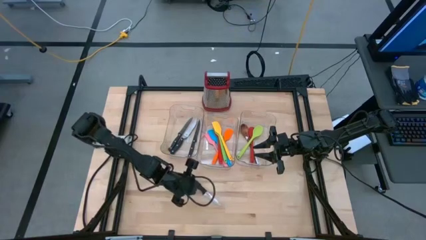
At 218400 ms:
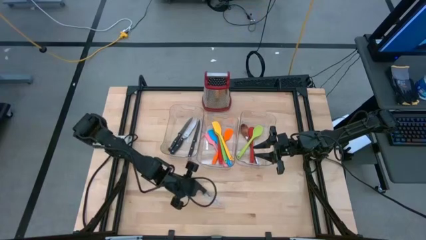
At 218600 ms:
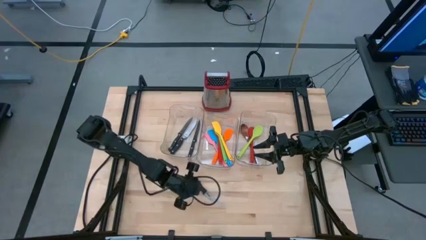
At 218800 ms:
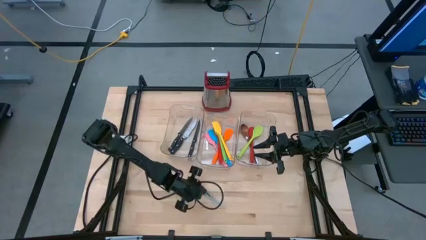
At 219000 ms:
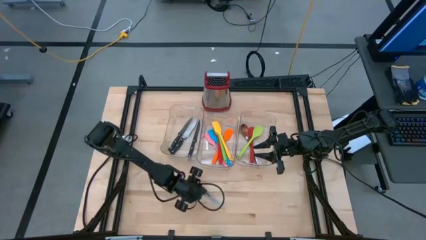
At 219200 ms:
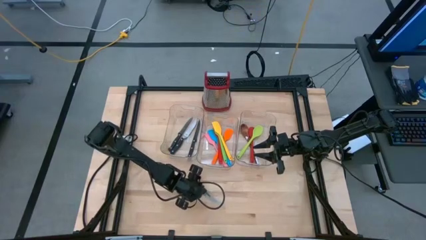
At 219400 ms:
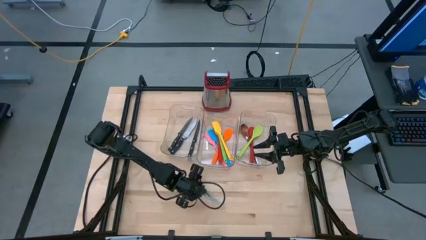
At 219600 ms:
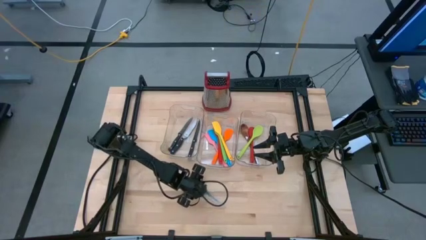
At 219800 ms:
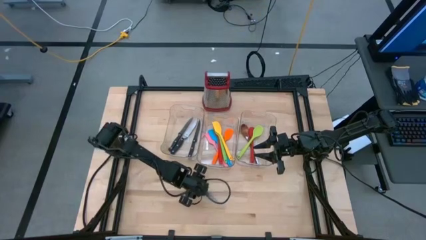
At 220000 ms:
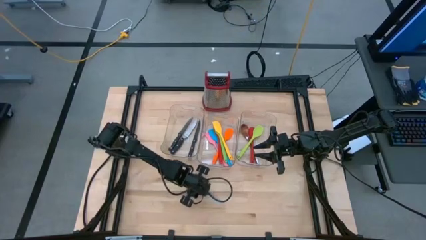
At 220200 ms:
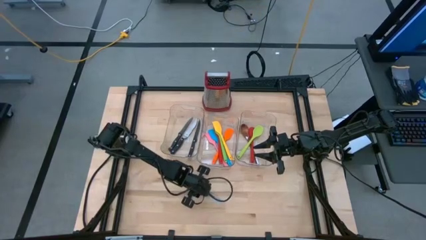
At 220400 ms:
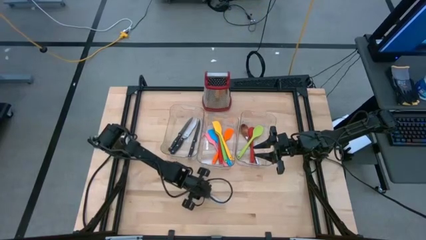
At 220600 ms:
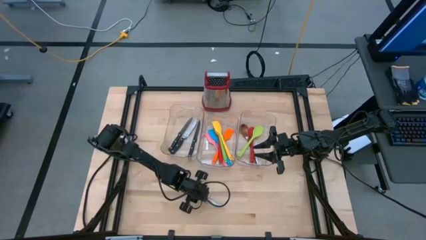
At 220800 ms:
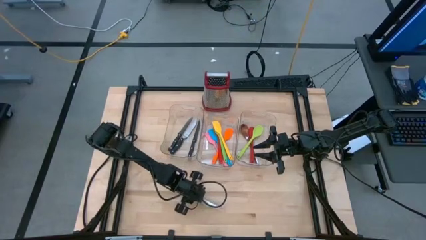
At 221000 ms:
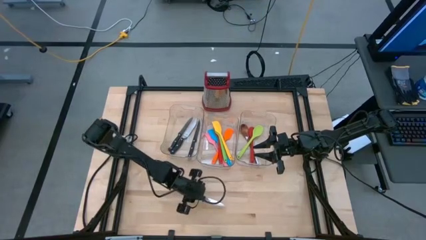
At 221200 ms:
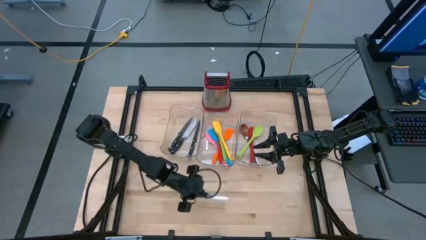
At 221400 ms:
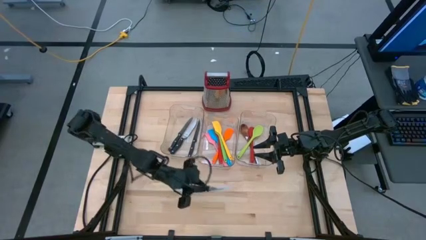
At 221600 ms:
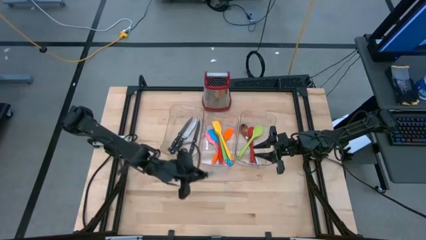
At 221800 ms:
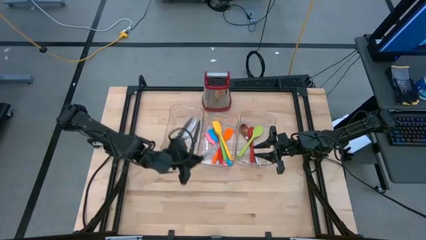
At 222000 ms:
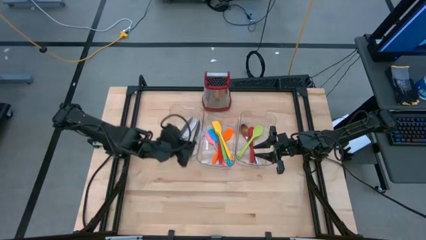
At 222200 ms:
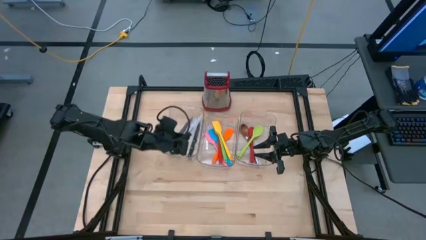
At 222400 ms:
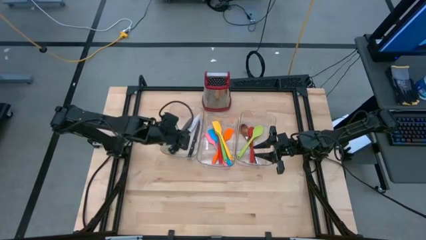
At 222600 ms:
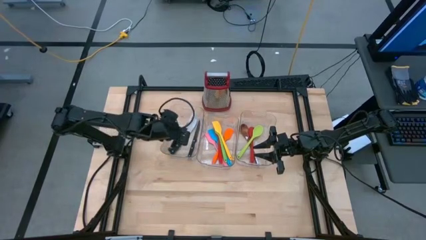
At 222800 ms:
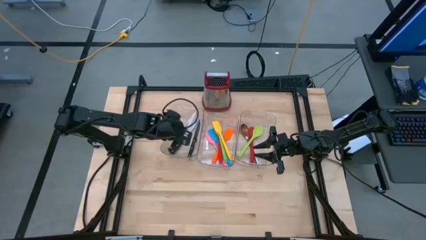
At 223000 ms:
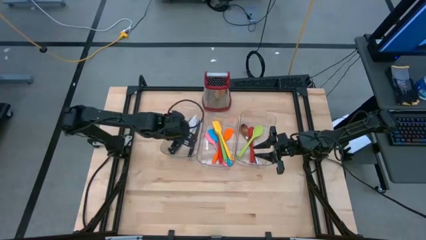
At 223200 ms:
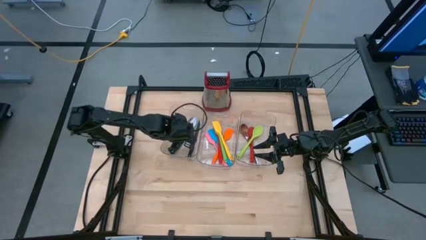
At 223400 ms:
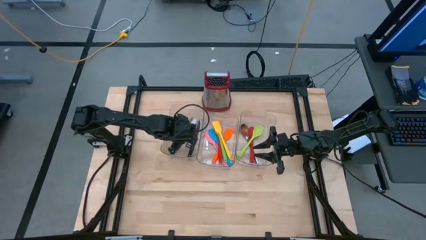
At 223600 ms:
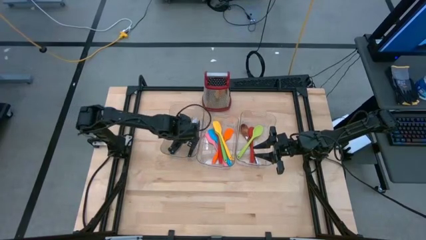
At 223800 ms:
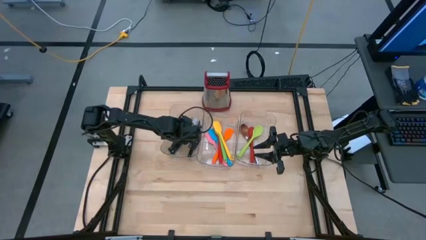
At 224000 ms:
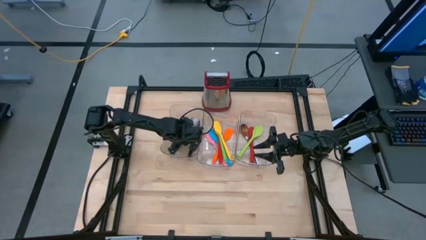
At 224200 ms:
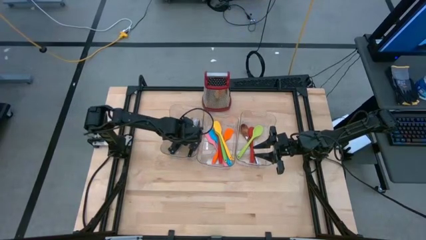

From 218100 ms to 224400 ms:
Task: Pick & Place Kitchen Items
Put the slice knife into the left transparent bin

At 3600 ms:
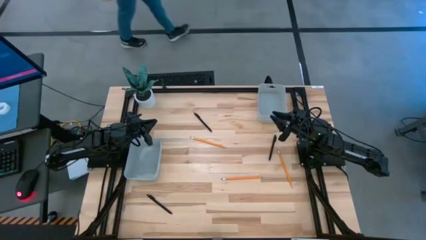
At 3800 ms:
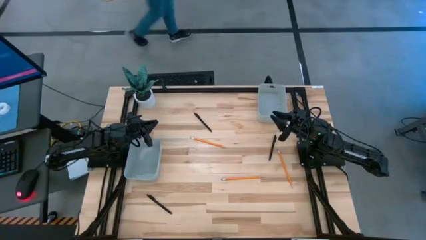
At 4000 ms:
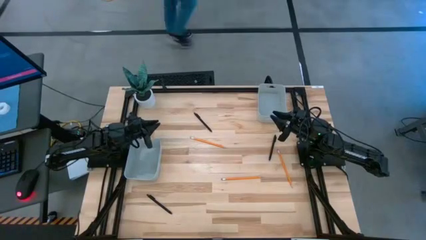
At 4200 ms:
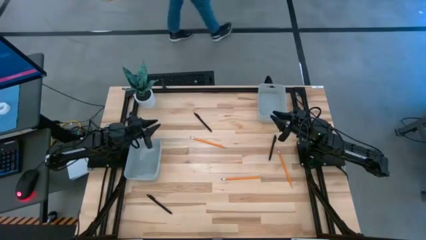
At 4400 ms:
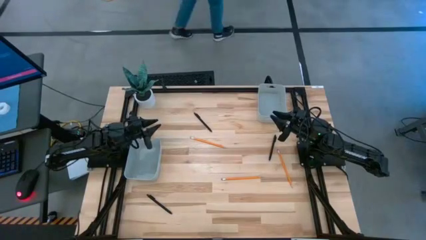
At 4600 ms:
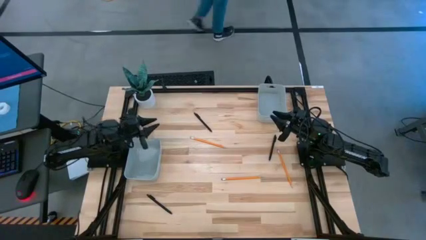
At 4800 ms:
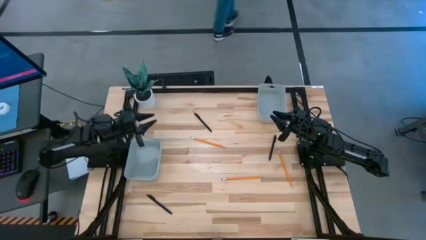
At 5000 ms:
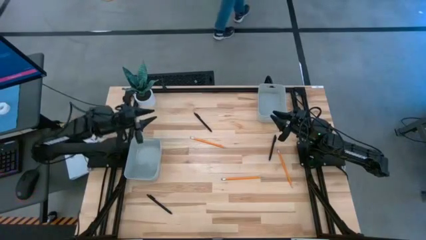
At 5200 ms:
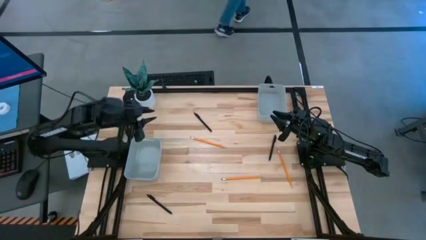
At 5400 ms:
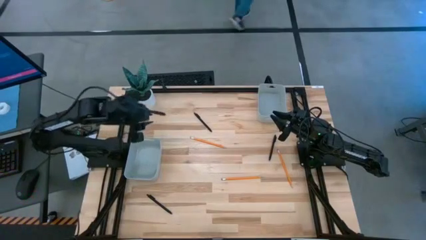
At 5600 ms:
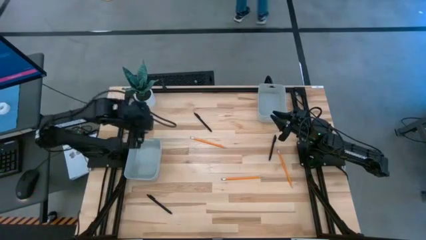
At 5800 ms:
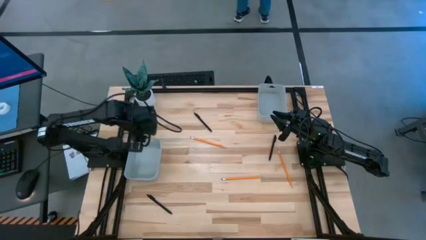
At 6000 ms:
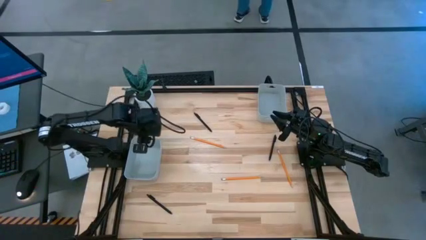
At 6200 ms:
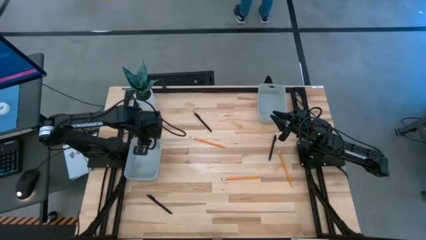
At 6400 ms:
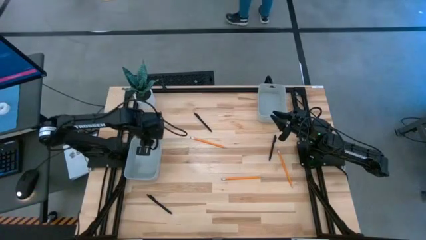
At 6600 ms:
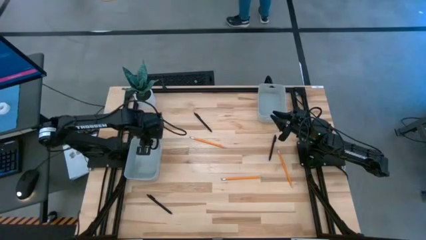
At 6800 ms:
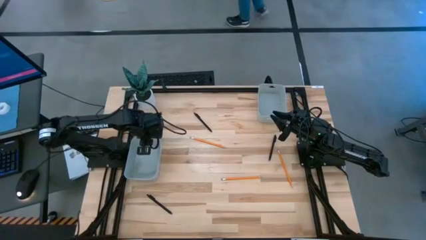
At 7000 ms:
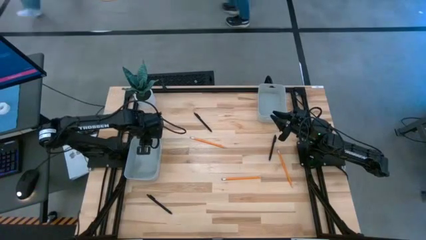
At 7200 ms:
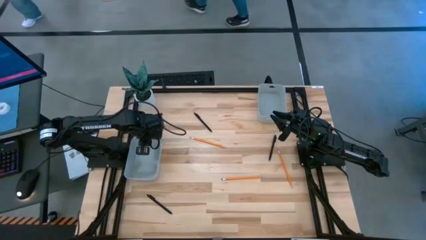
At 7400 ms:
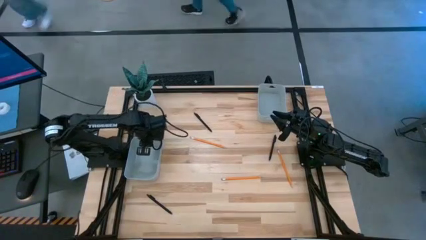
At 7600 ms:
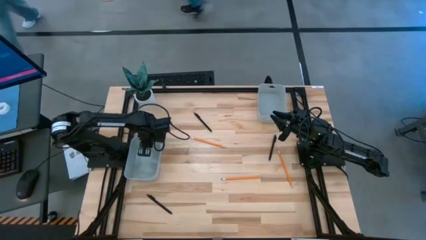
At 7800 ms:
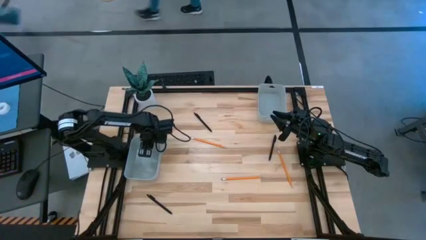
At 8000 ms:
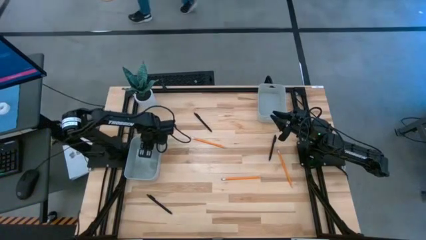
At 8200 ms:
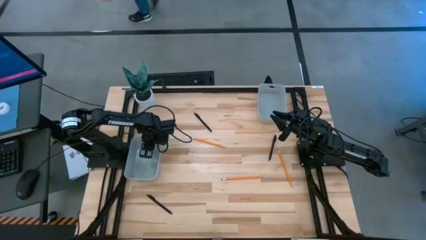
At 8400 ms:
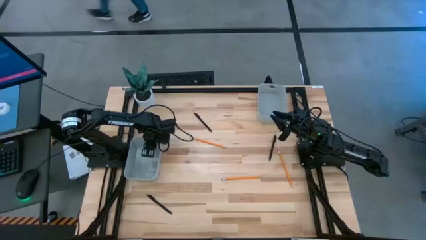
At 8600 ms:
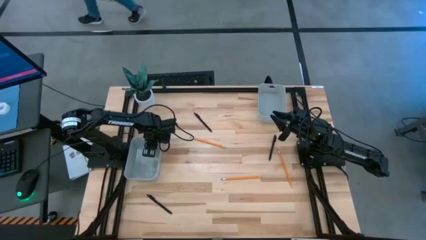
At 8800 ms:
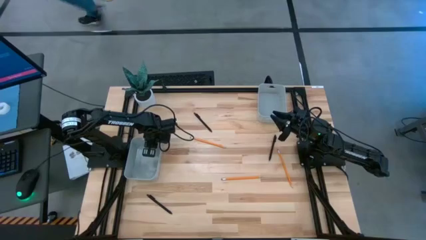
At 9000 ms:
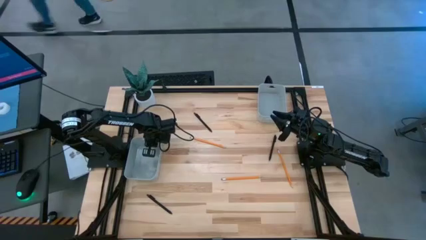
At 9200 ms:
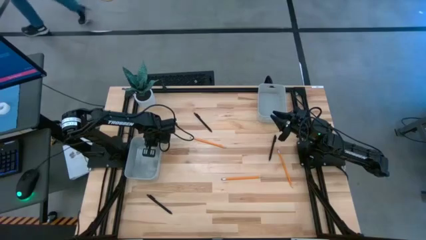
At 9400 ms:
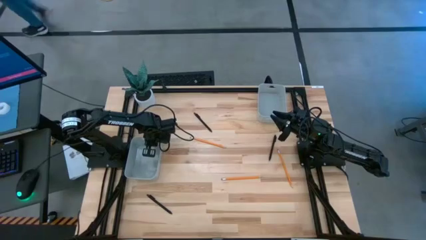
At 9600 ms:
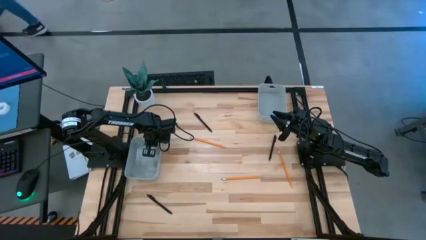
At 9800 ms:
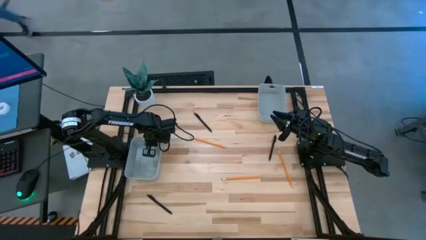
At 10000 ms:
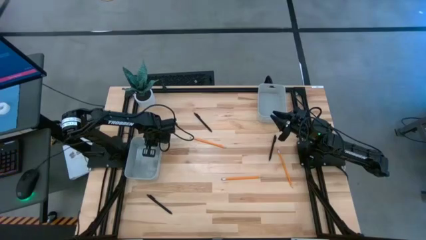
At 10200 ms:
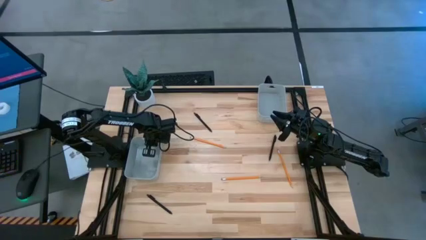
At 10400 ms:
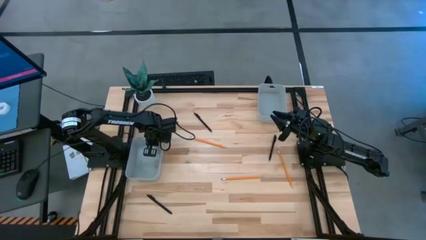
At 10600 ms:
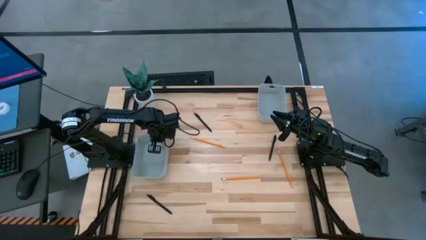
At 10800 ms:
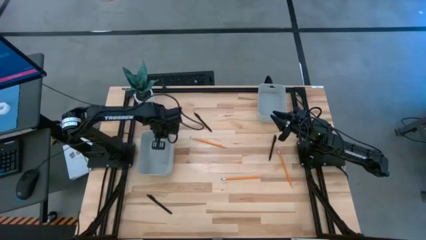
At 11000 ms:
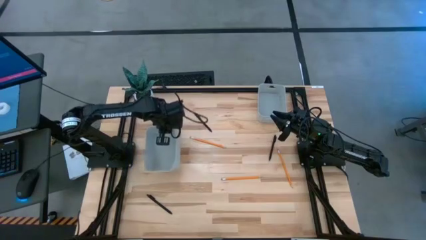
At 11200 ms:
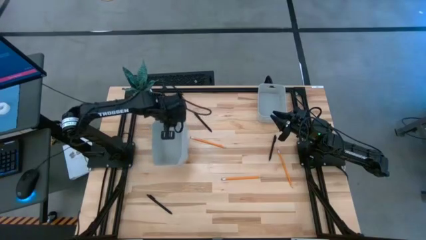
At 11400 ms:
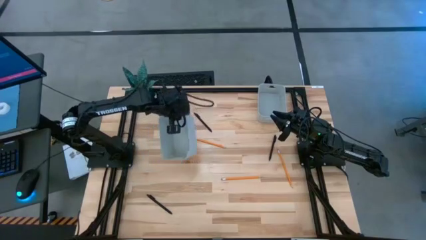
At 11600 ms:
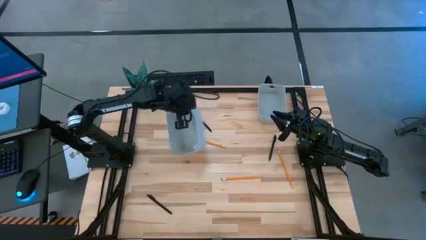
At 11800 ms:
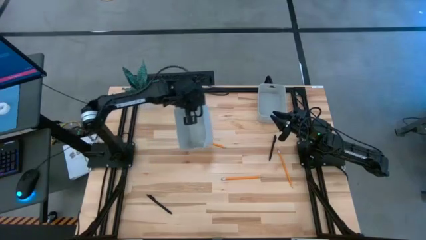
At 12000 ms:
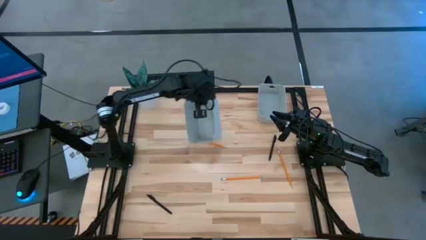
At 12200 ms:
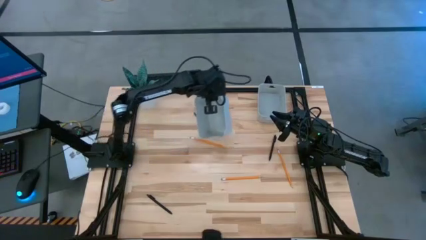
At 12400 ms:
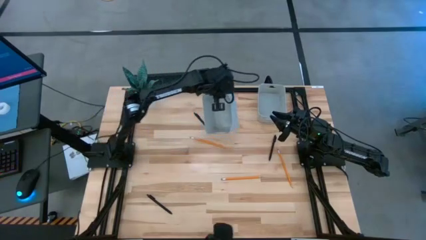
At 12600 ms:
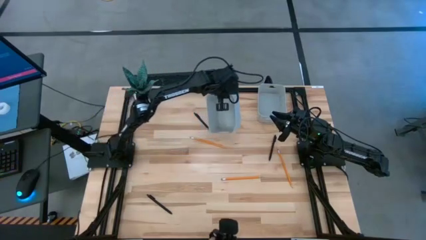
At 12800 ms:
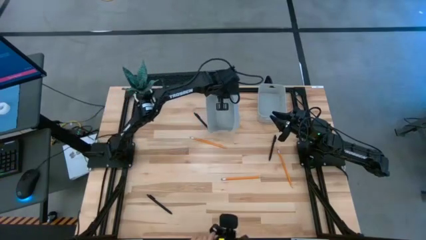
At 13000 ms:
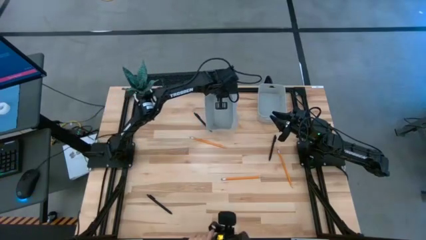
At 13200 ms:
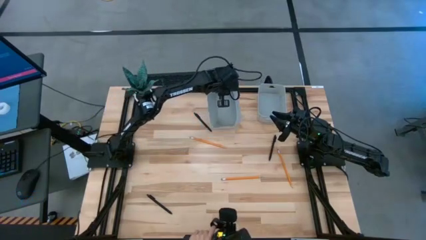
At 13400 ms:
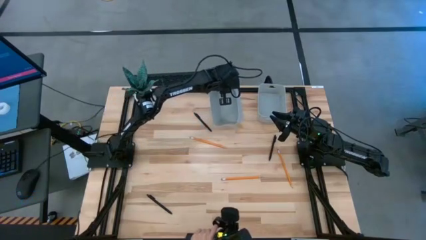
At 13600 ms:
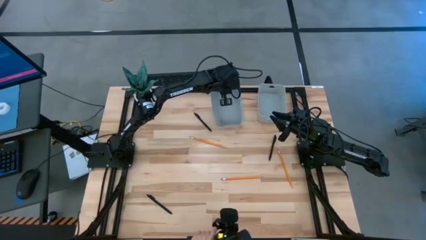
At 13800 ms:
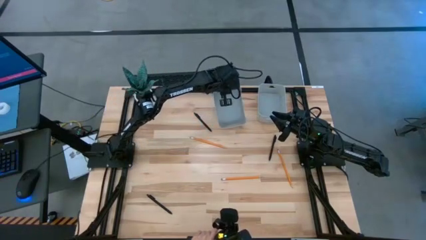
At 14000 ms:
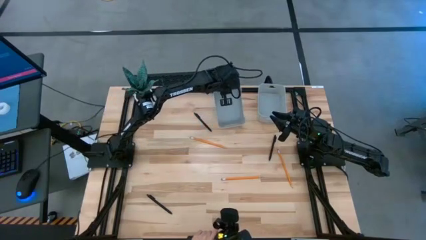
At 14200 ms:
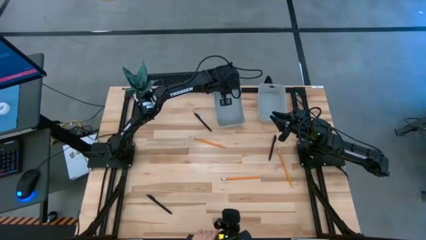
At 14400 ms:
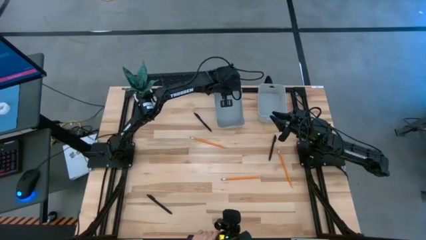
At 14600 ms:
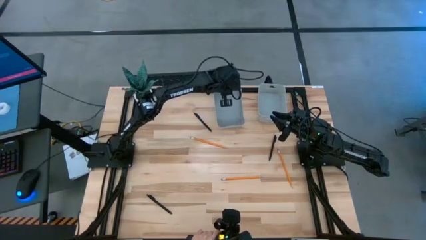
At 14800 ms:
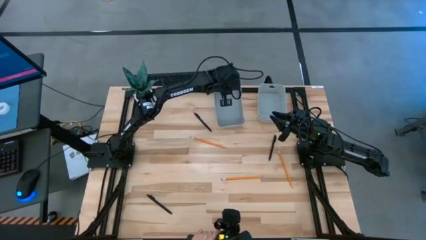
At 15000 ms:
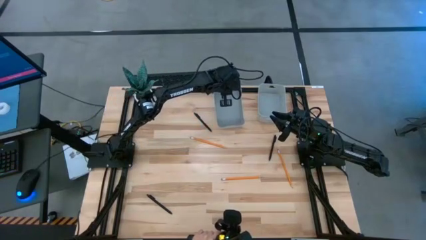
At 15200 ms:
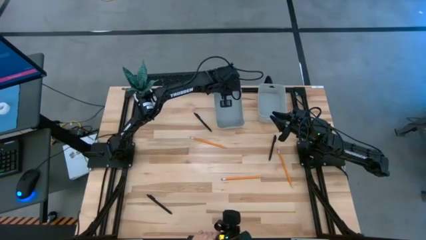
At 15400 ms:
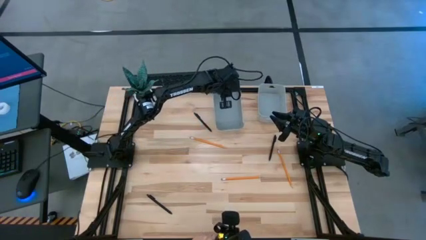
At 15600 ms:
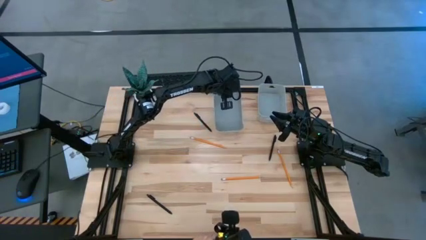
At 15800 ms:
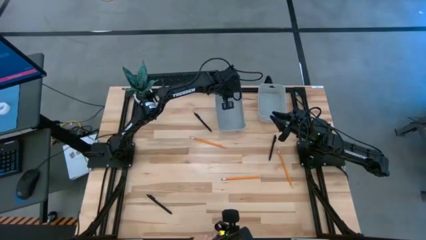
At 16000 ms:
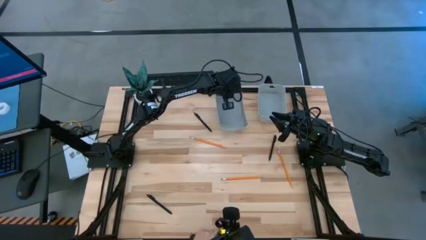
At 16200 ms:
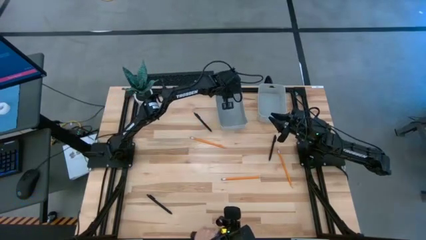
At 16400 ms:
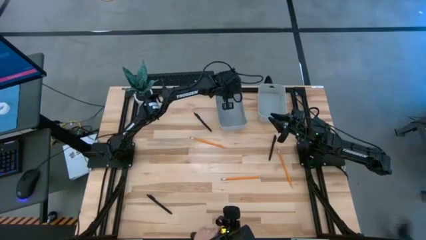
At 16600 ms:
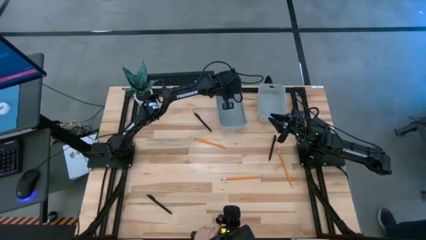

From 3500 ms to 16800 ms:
Task: Sort pens & pencils
Move the bottom gray bin to the top of the table
